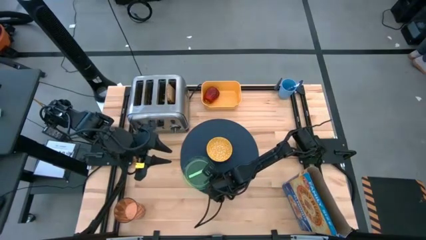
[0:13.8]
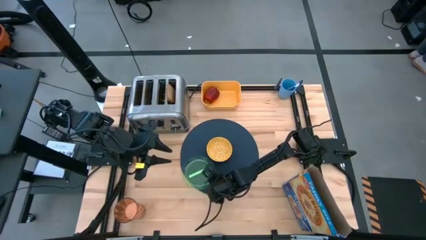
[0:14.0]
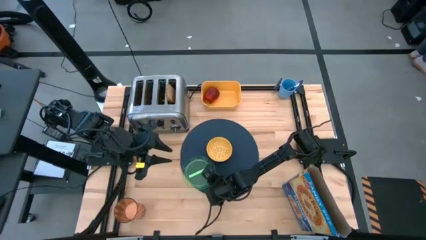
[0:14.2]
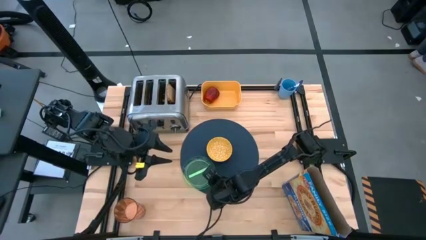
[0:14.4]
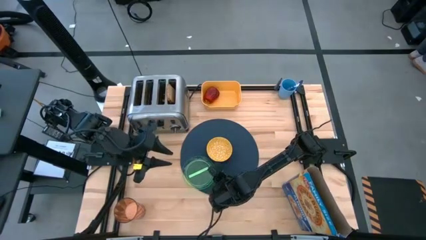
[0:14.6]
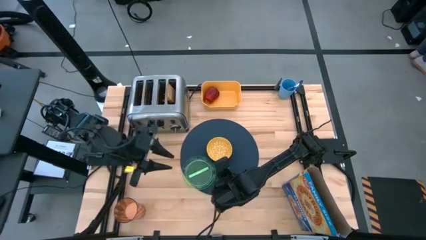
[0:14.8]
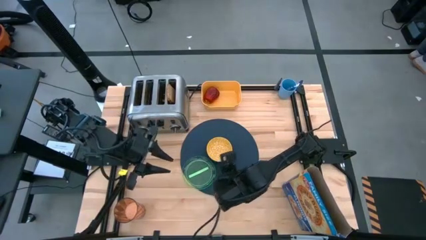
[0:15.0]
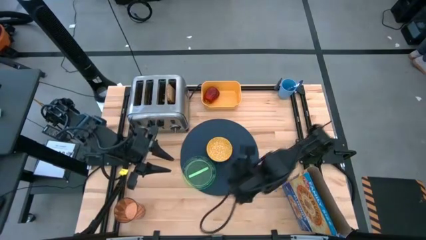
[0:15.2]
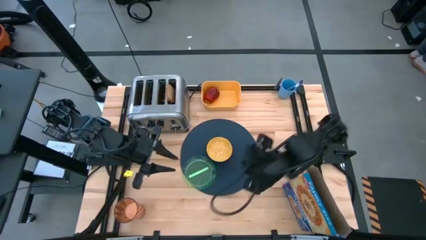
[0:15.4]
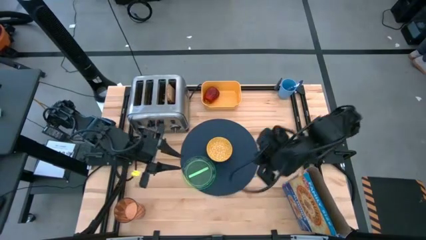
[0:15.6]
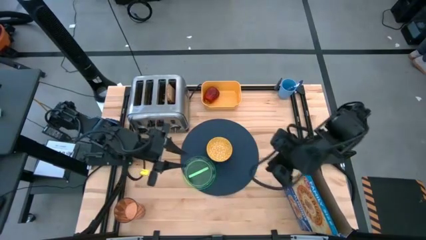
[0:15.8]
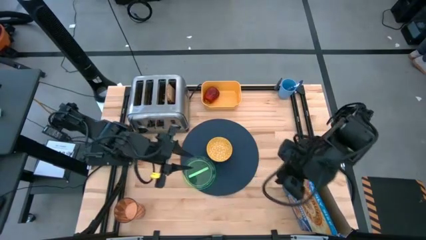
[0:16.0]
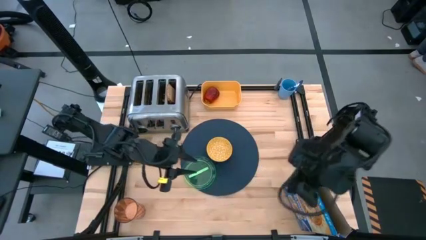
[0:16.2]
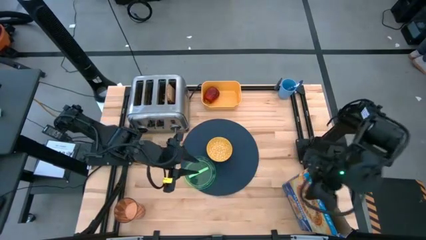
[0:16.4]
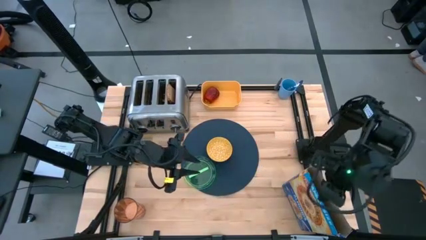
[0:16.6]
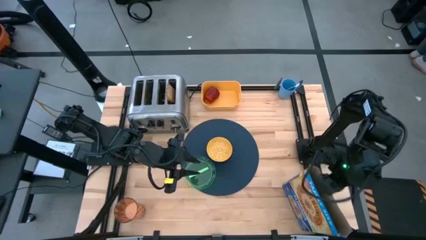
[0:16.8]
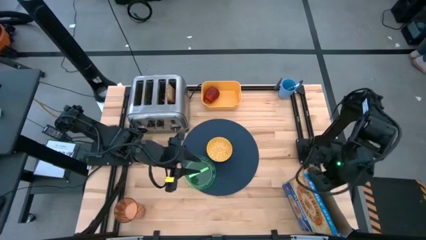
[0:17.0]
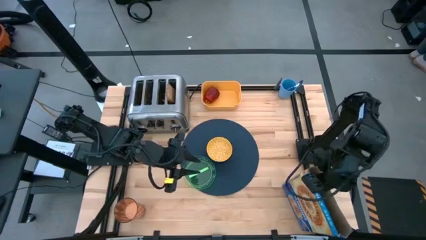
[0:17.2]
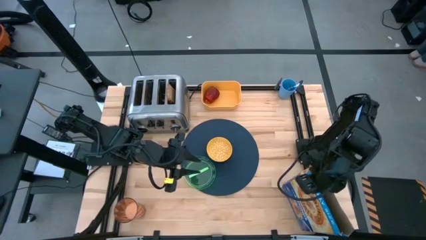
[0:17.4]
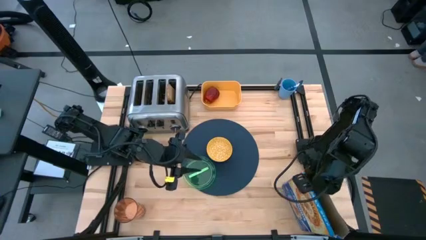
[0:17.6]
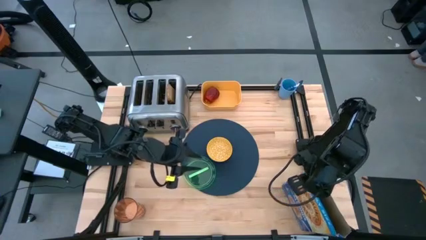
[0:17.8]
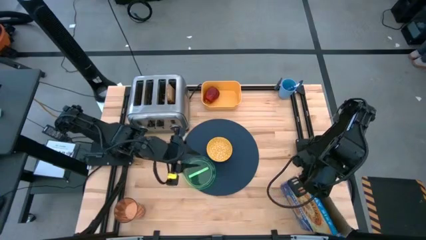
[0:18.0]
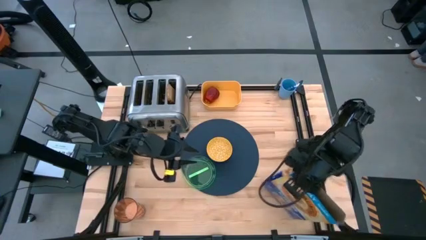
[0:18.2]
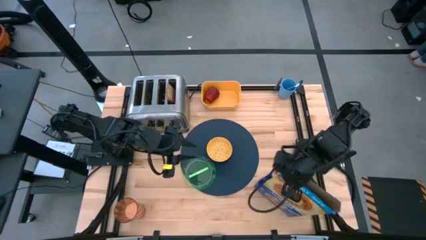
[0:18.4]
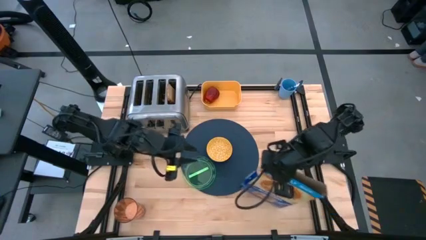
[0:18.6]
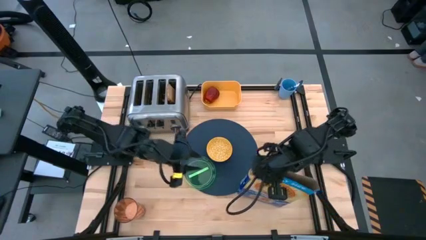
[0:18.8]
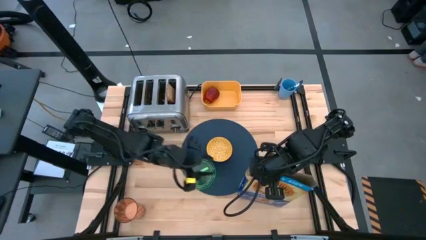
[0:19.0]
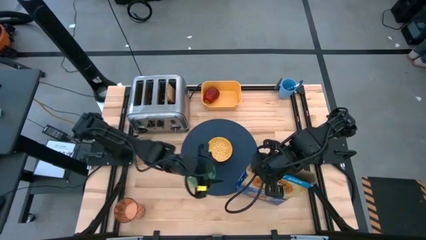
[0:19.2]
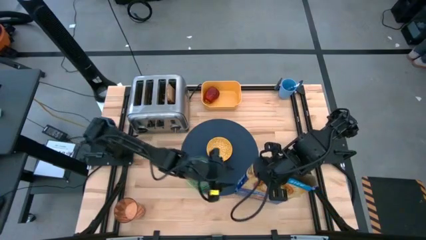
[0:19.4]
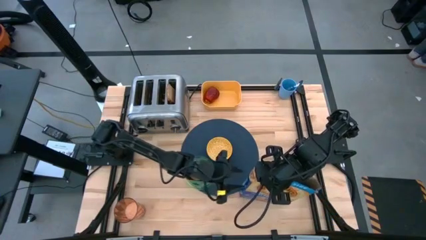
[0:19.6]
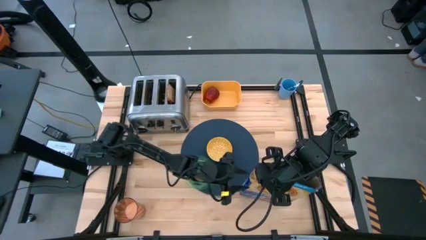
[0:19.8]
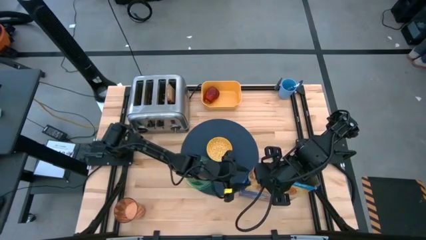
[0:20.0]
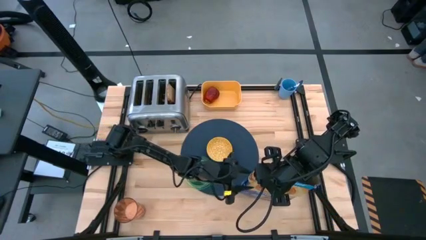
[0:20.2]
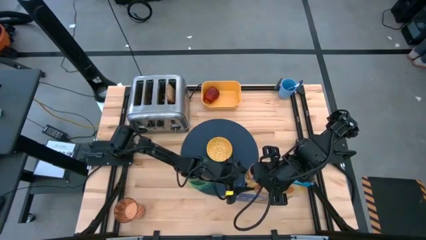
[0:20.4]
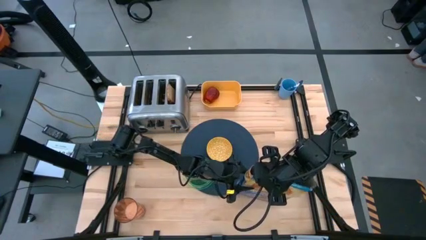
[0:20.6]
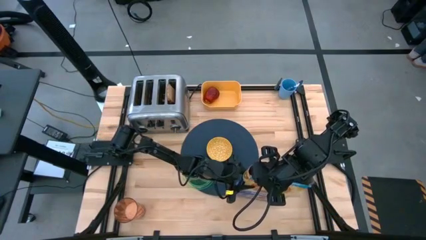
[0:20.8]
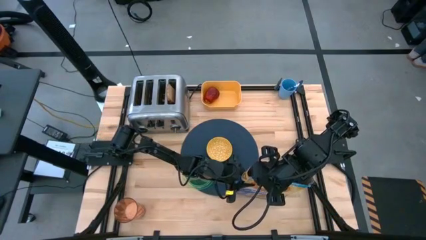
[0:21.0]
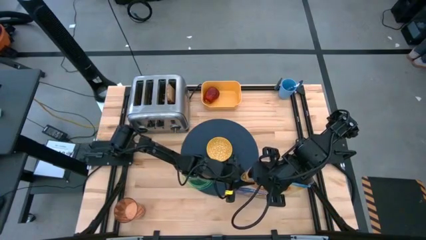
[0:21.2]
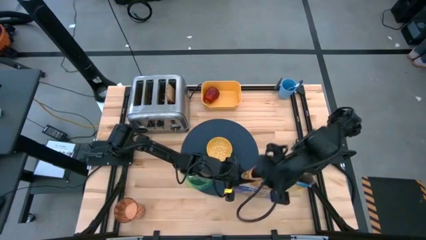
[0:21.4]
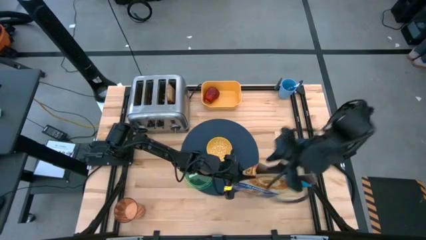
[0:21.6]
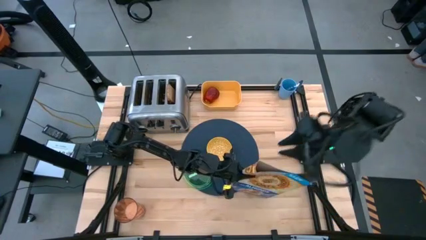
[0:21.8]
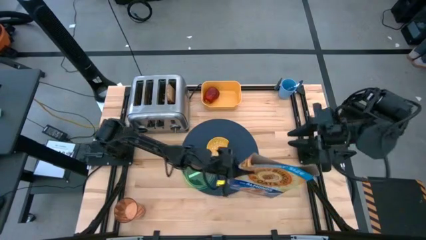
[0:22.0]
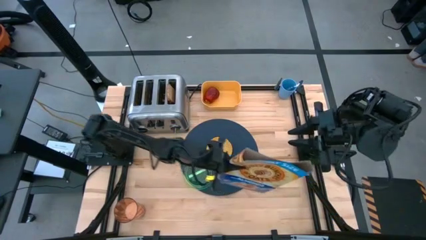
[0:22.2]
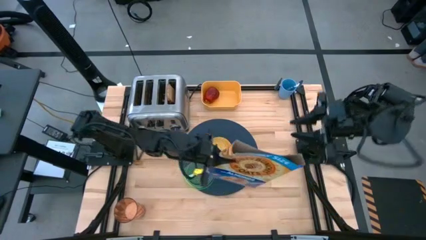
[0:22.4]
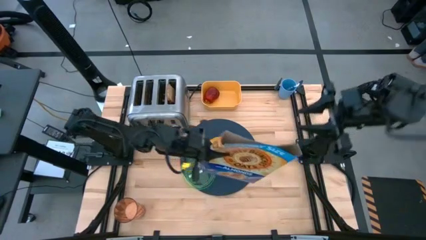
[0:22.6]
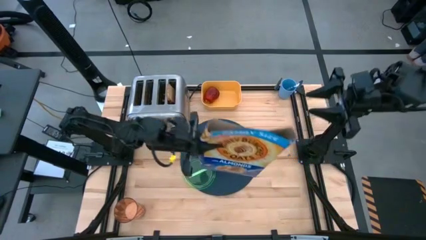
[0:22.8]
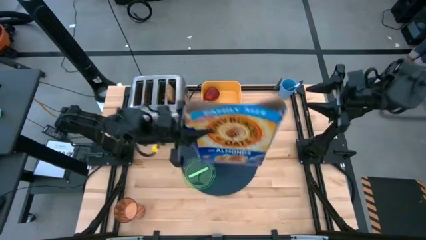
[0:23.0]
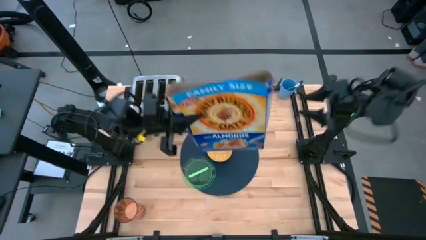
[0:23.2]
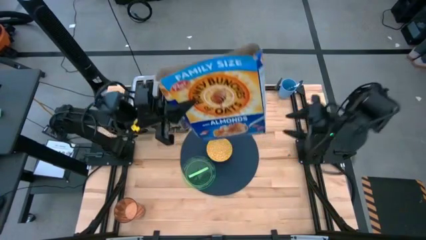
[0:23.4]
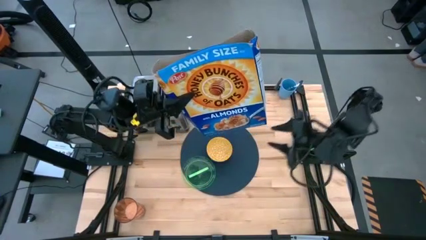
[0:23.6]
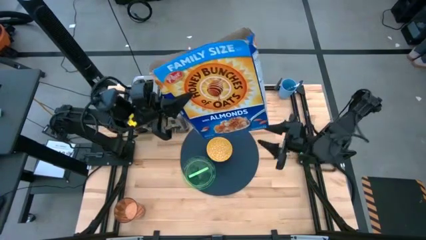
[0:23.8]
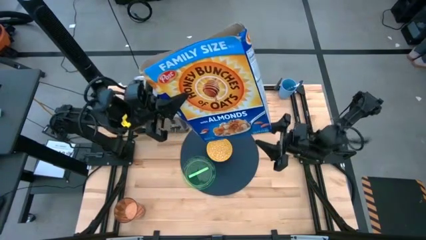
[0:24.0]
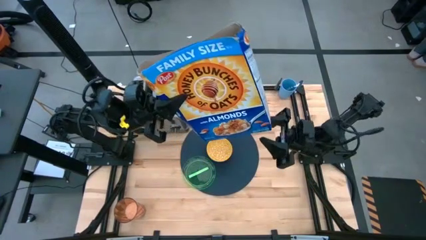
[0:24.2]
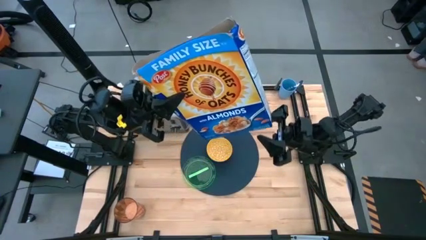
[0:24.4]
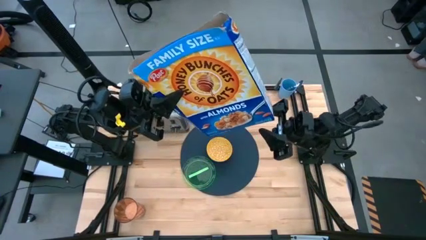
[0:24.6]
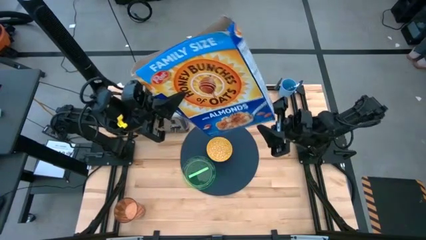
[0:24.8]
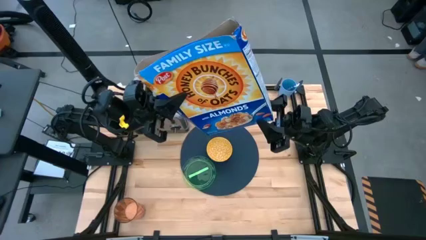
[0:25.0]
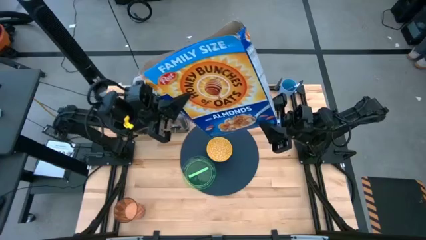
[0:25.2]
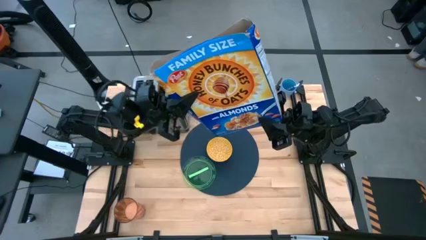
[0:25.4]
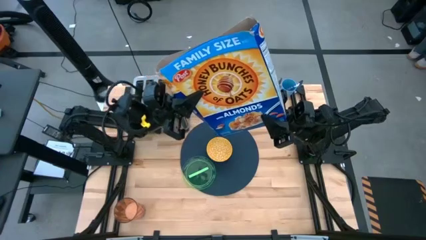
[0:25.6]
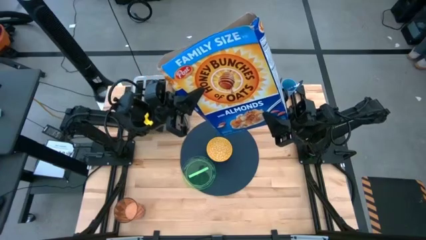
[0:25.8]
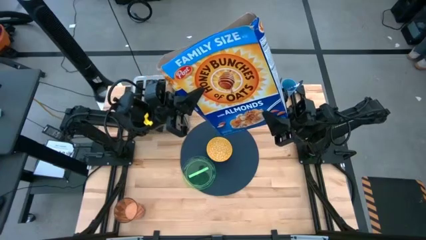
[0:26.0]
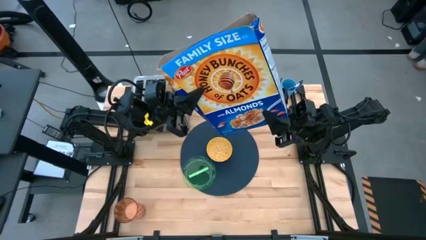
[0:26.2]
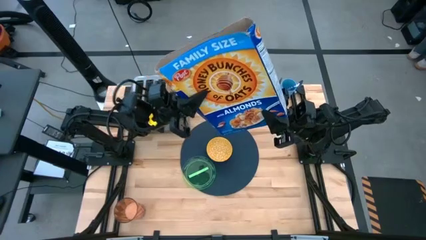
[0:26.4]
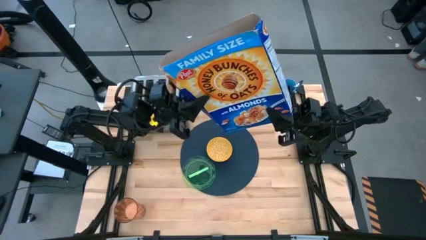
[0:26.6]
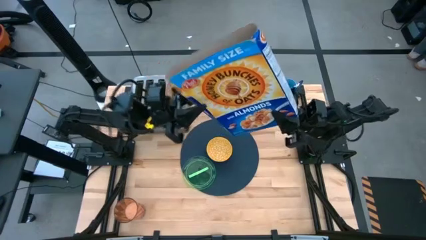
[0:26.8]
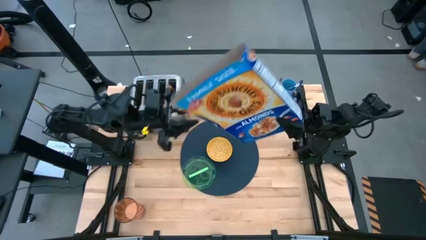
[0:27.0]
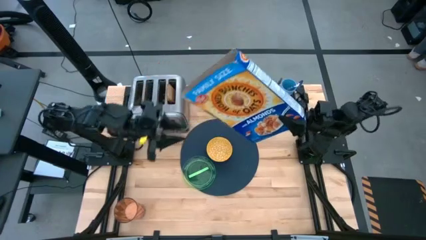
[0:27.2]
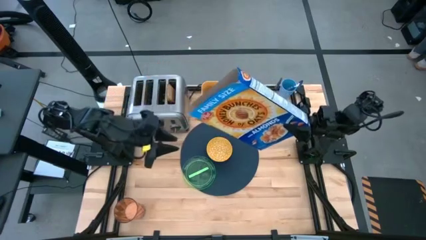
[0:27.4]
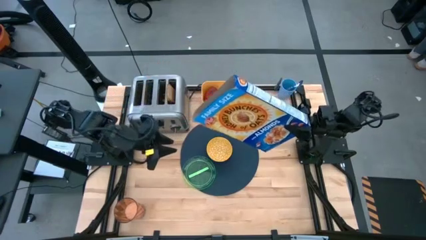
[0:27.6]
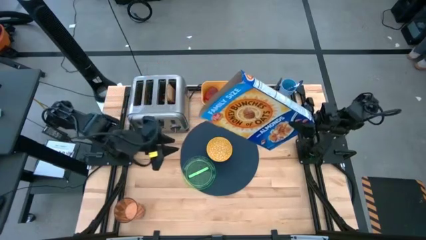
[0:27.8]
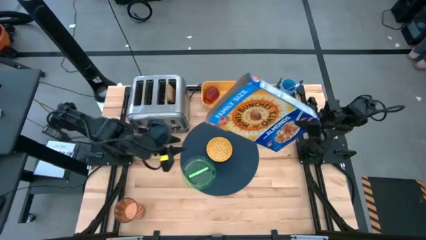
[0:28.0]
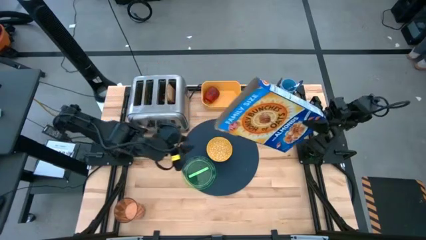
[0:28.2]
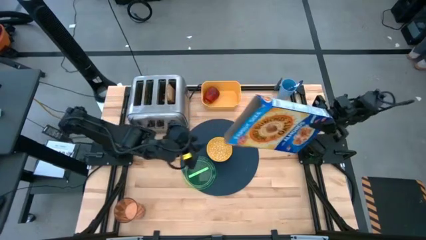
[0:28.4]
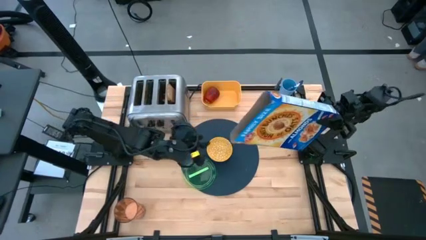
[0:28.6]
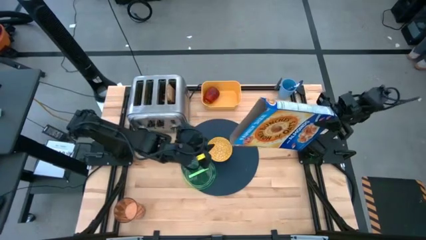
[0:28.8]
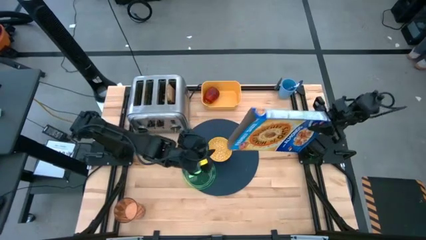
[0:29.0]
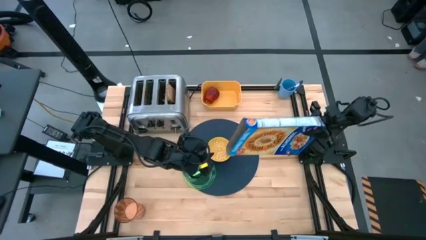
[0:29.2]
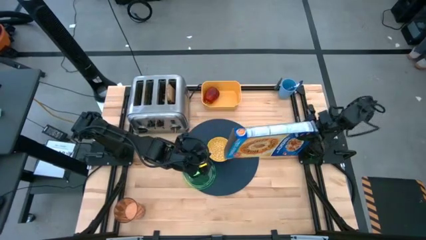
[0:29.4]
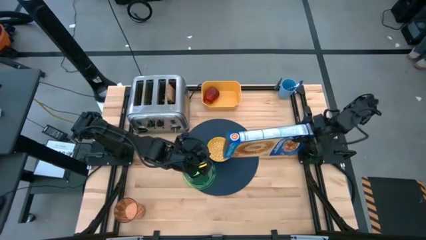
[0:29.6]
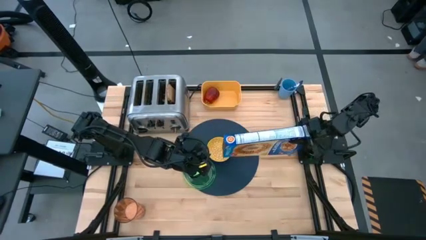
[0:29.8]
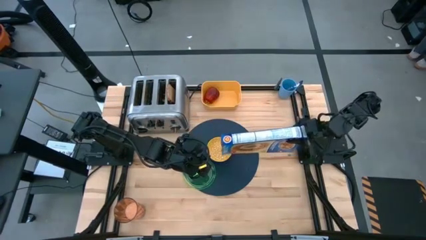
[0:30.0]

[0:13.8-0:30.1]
Task: Arrange a breakfast setting
Pour the cereal from the blue cereal box into the yellow bowl
